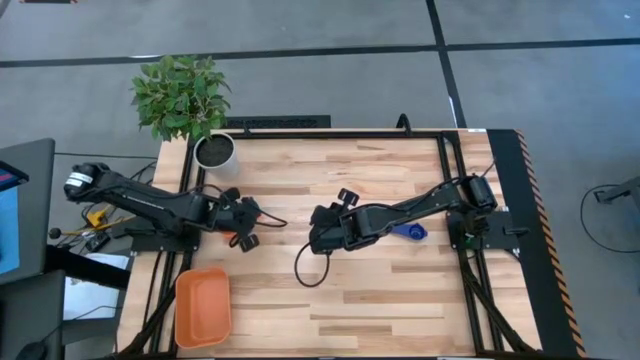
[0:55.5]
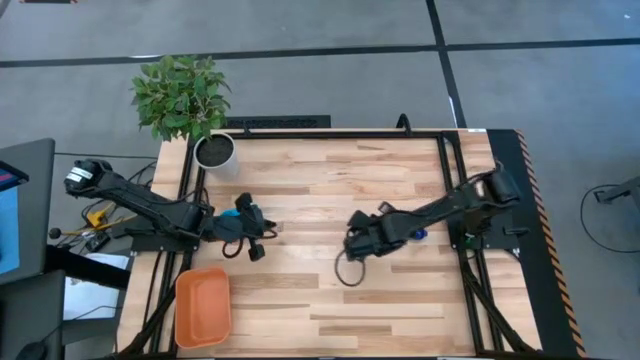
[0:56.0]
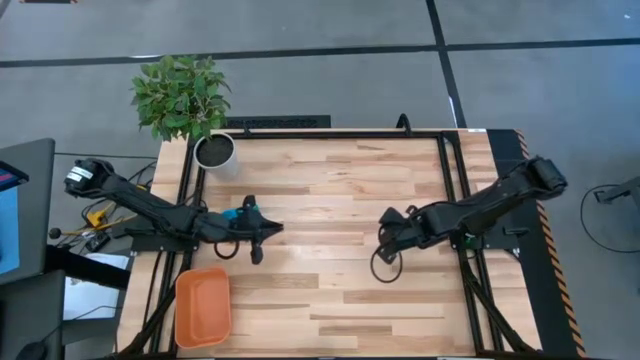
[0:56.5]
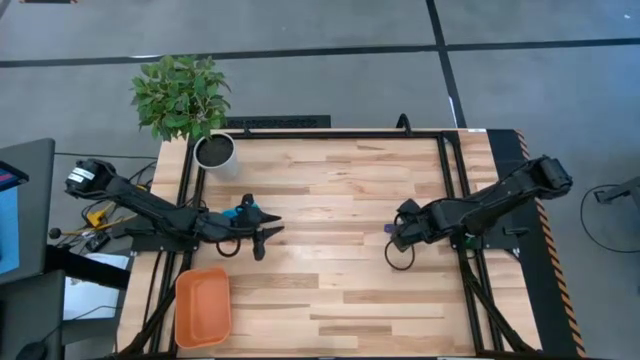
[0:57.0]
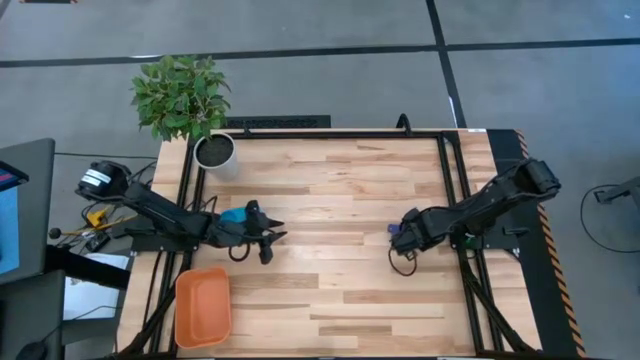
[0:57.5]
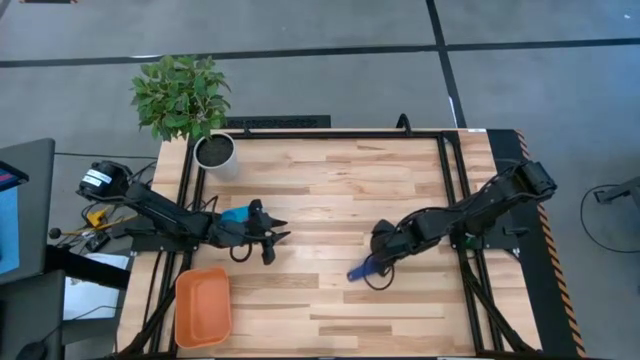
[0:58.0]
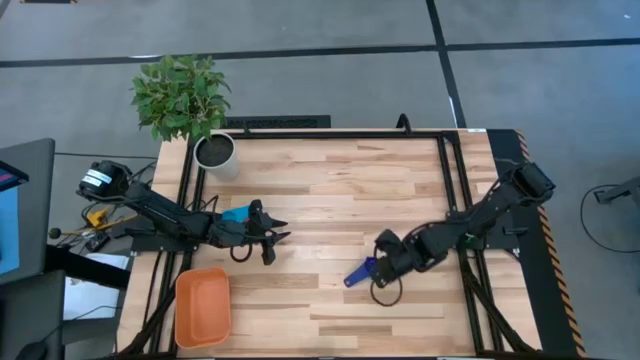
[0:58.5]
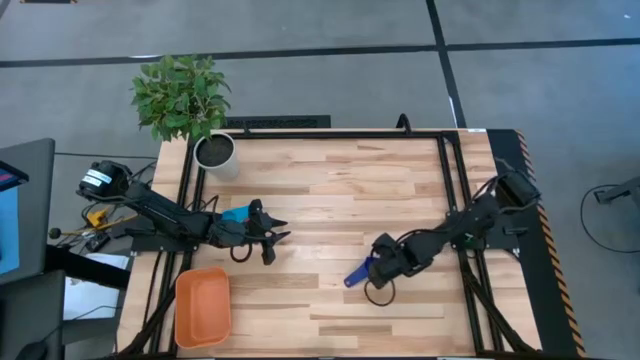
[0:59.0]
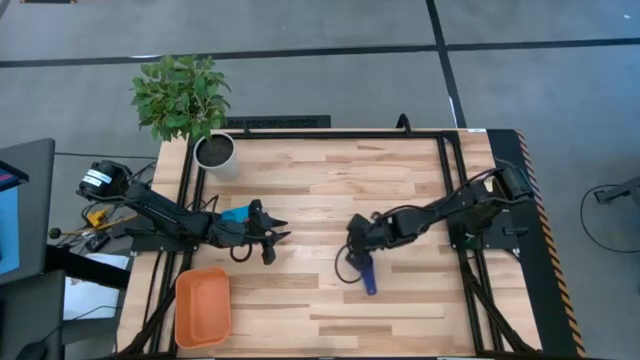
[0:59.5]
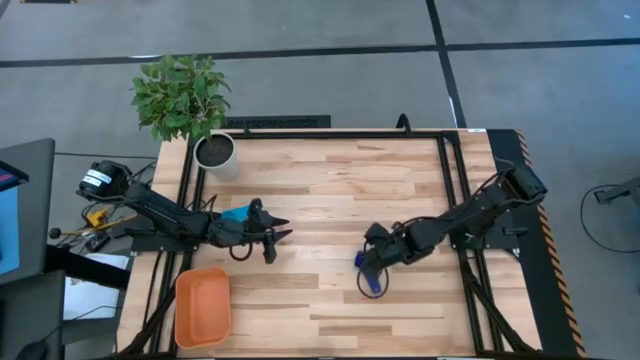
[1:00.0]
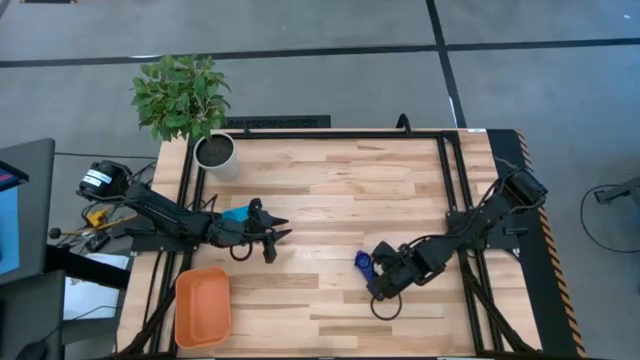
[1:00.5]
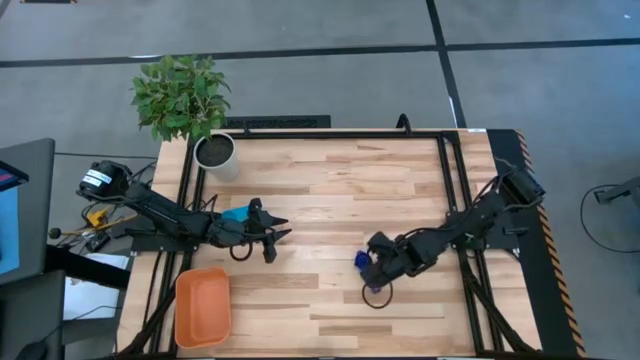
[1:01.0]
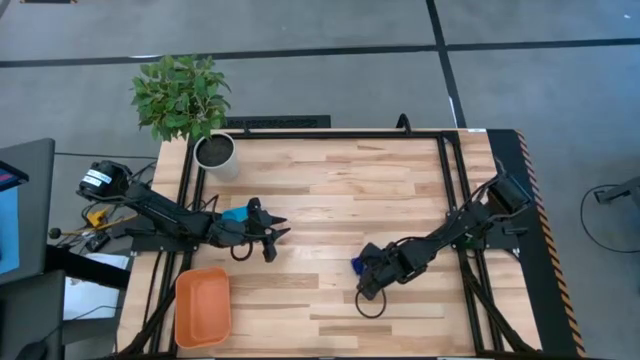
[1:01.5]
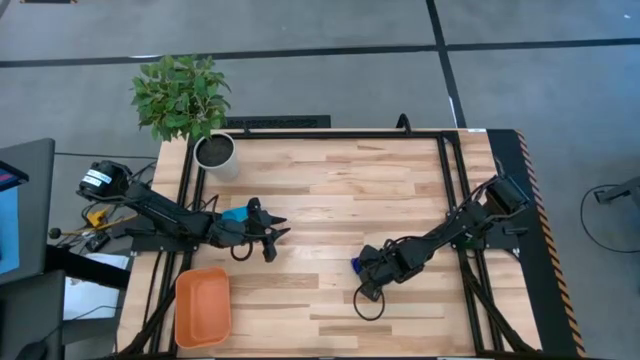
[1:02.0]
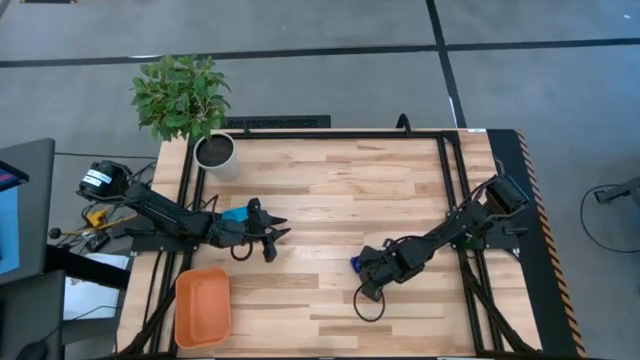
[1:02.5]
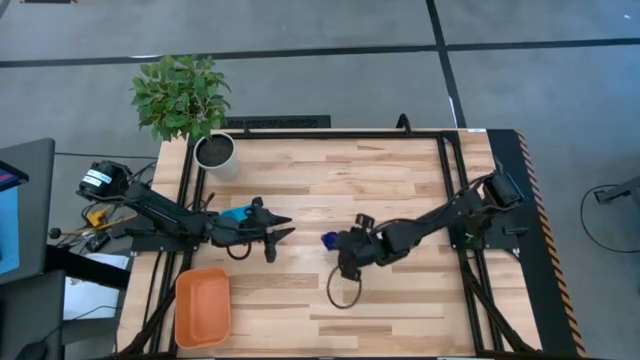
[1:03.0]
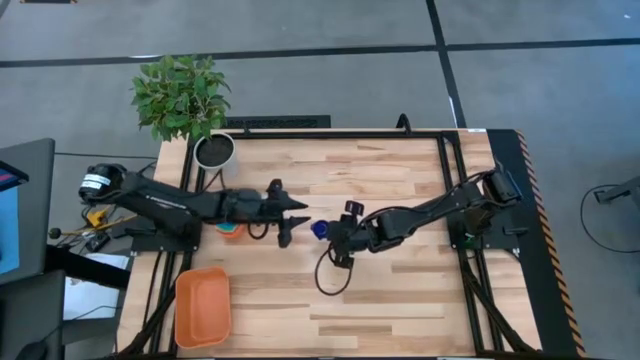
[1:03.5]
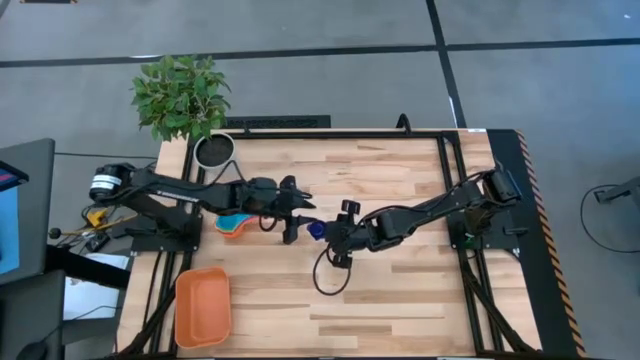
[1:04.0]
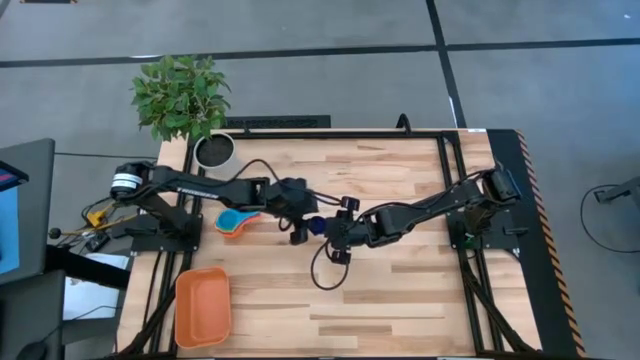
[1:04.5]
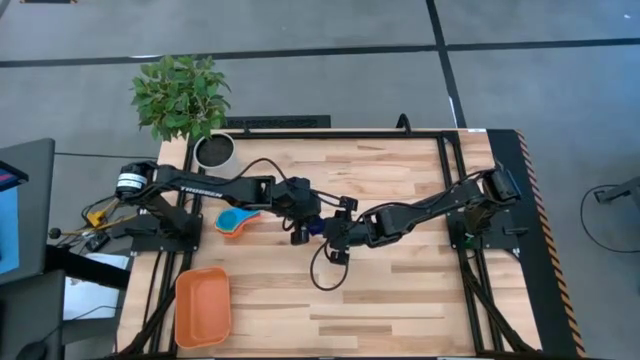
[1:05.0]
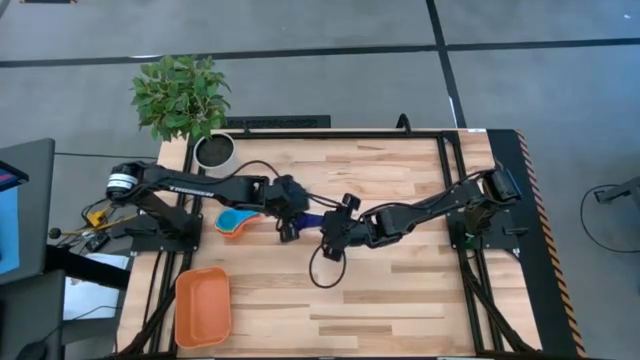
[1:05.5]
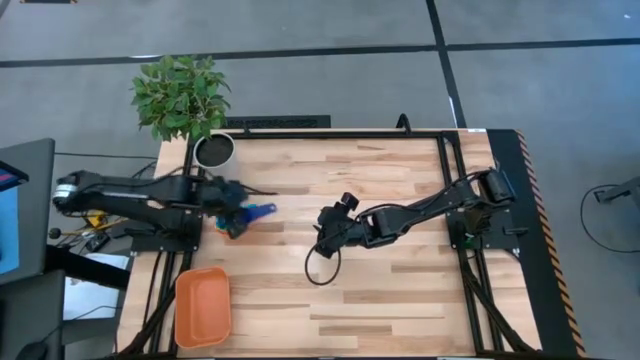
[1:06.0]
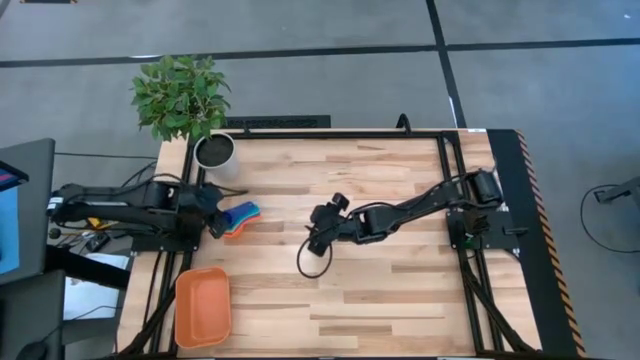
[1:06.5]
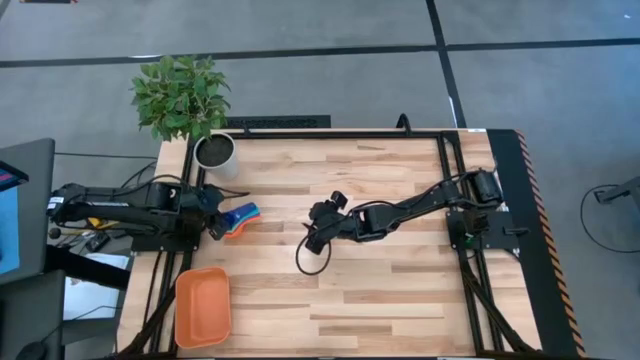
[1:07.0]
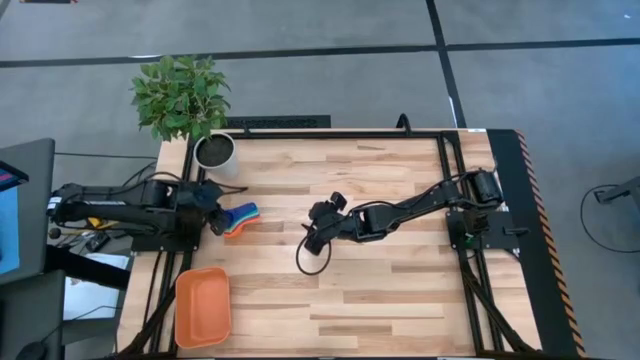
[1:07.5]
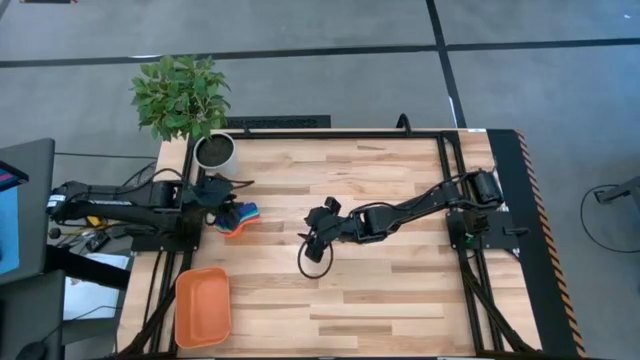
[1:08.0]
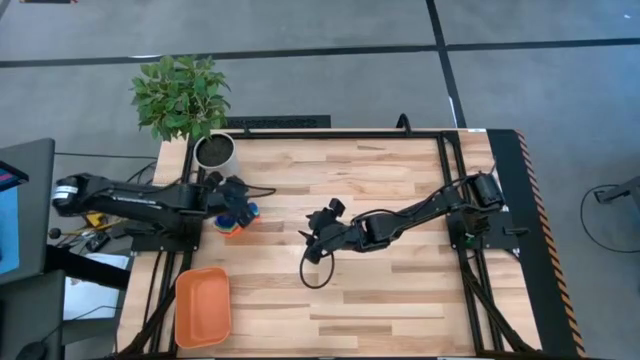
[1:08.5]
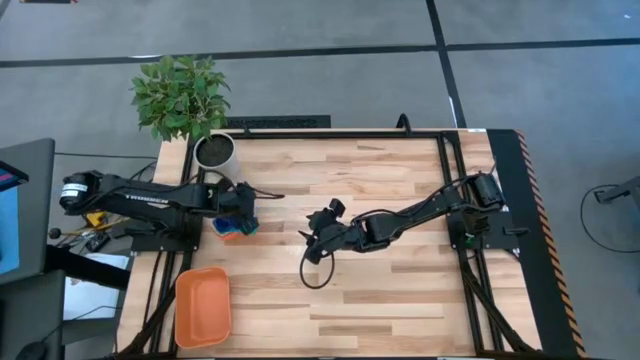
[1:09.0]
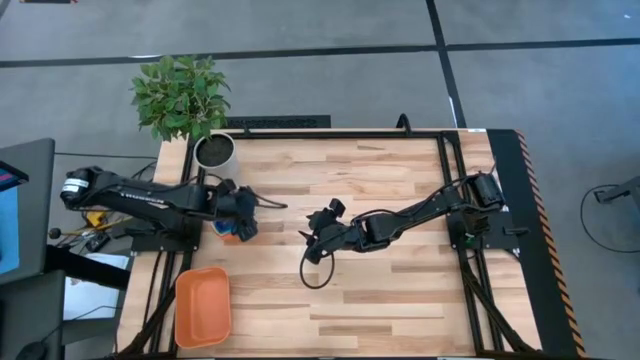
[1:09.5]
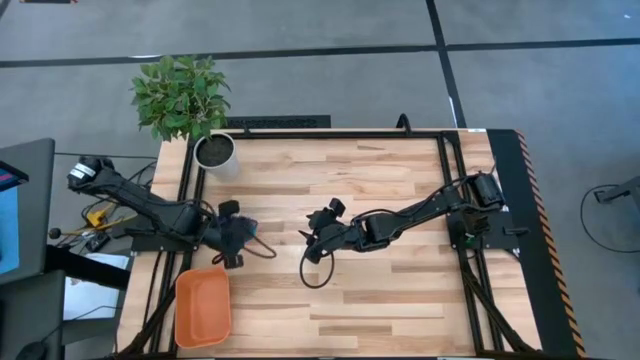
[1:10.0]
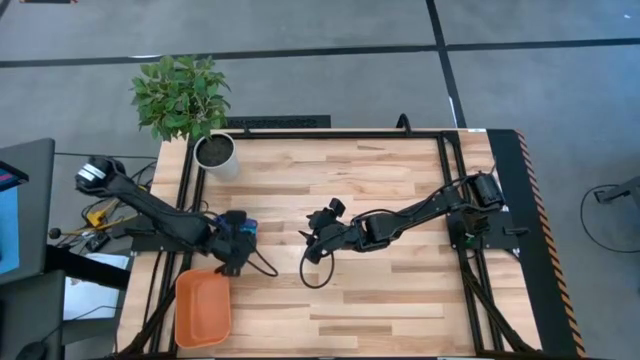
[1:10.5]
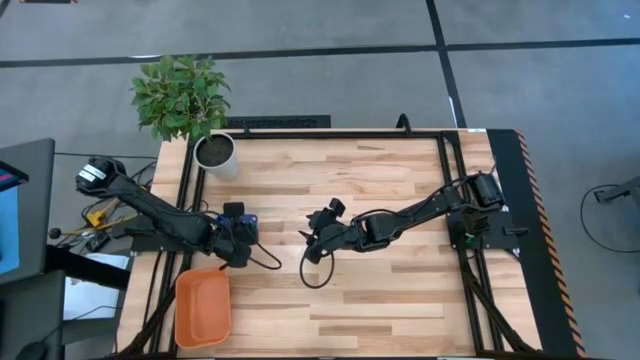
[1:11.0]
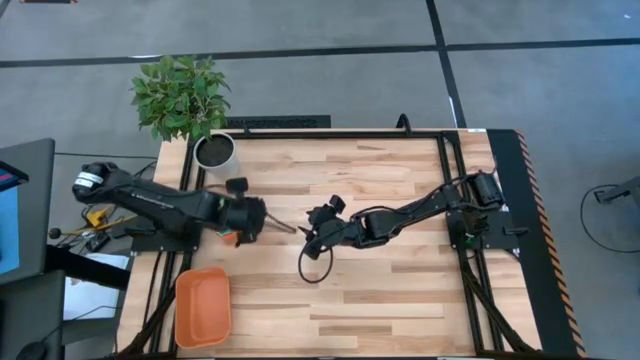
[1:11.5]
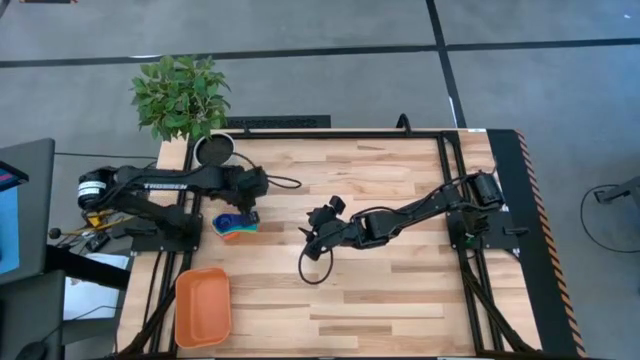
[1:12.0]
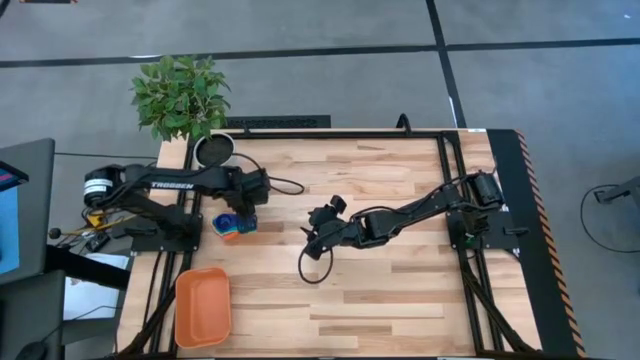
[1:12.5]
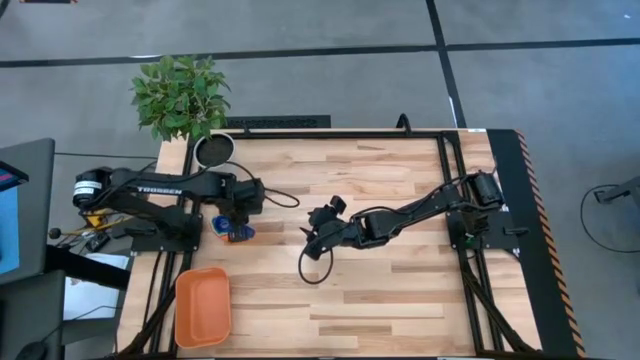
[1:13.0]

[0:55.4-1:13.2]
Task: Nest measuring cups in basket
Stack the violet measuring cup on top of the light blue measuring cup

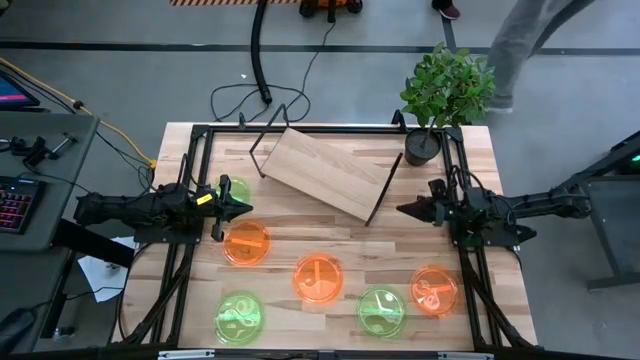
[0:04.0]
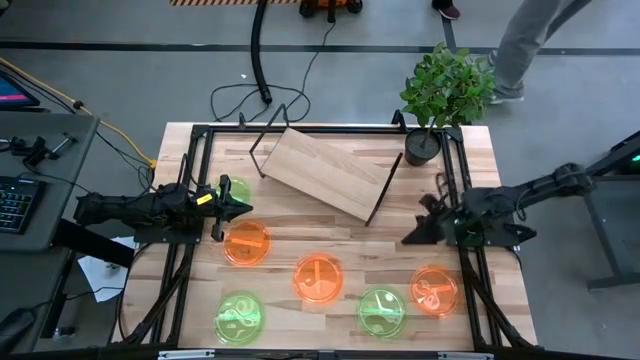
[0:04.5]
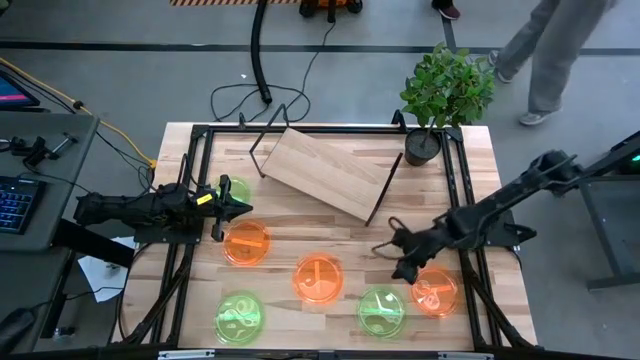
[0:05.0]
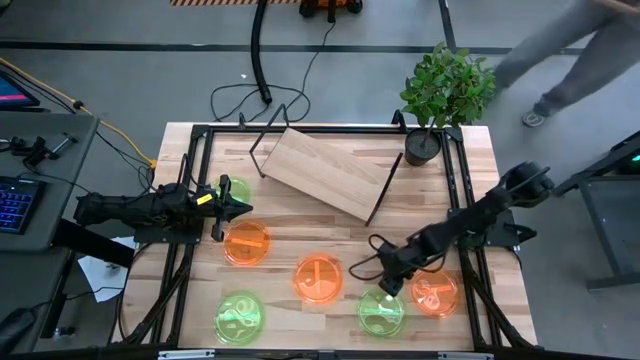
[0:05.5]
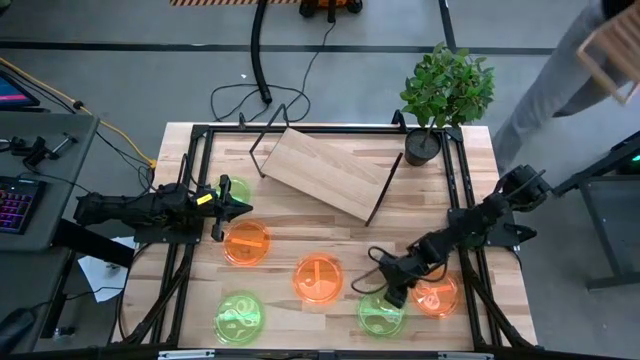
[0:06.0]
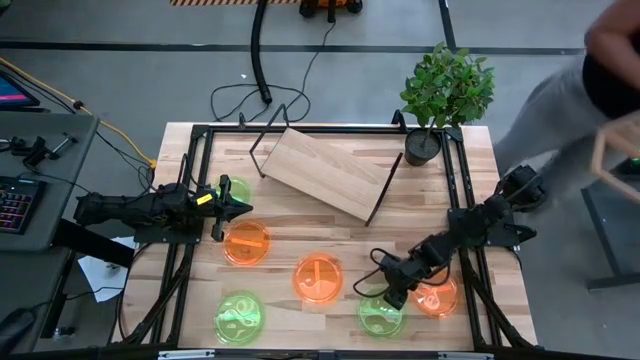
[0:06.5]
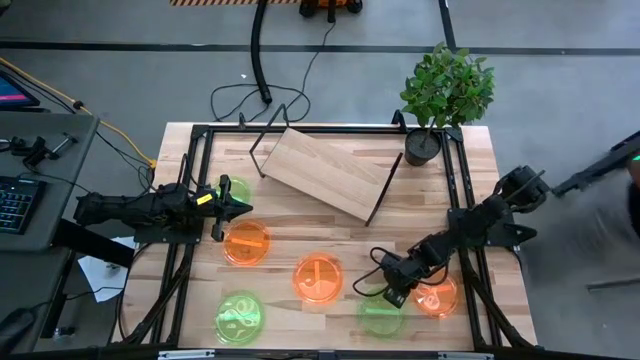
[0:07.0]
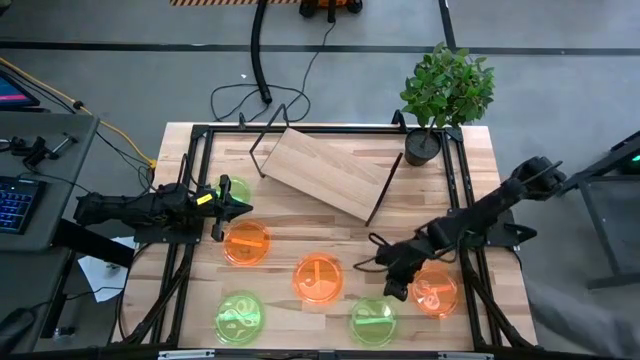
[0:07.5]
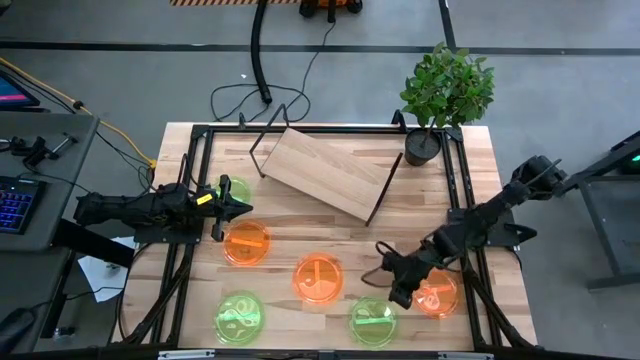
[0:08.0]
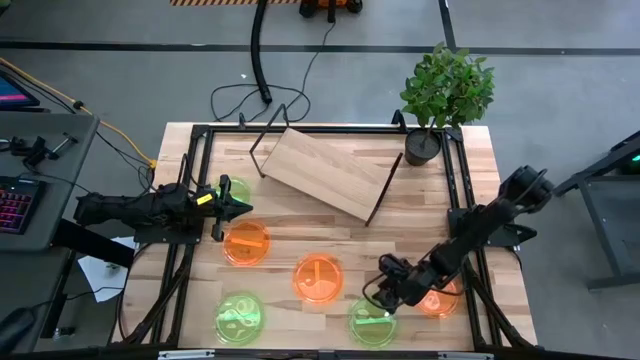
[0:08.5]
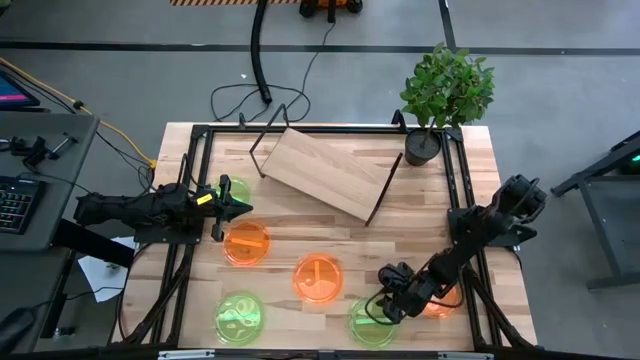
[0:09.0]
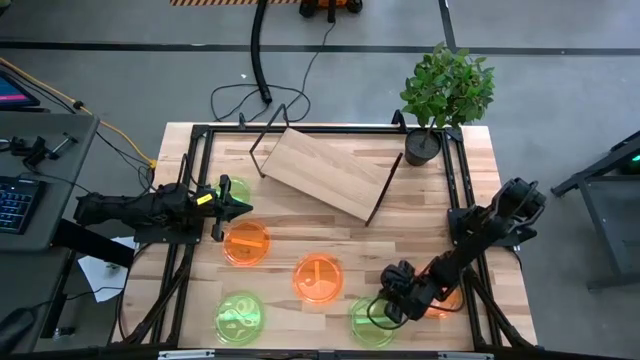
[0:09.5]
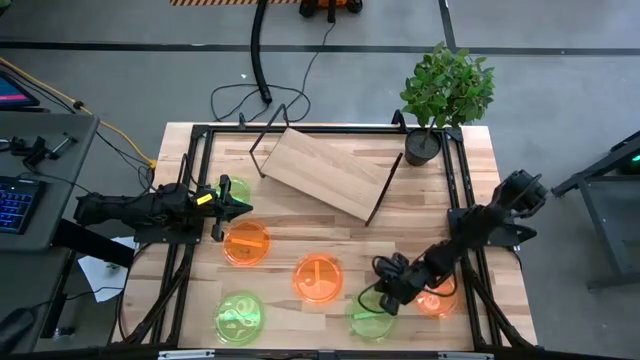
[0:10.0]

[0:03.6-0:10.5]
Task: Place and stack plates onto a shelf
Put the bottom right green plate on top of the shelf
